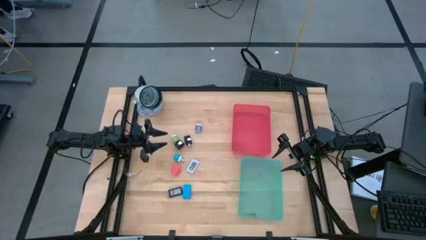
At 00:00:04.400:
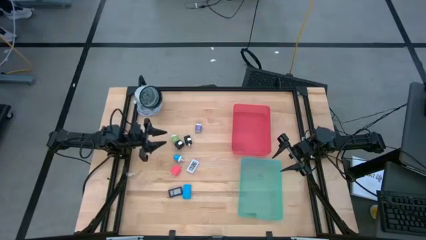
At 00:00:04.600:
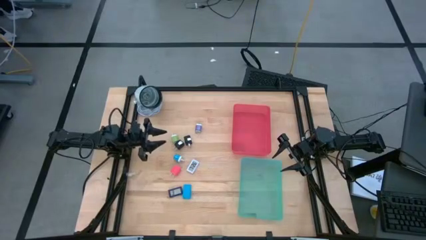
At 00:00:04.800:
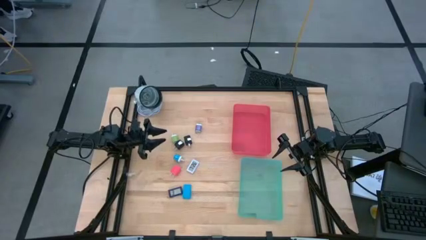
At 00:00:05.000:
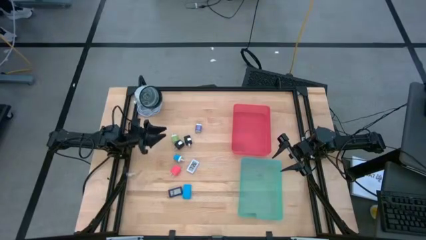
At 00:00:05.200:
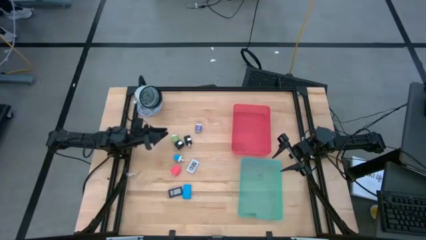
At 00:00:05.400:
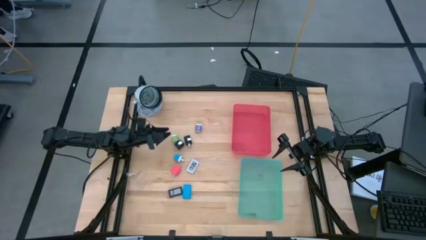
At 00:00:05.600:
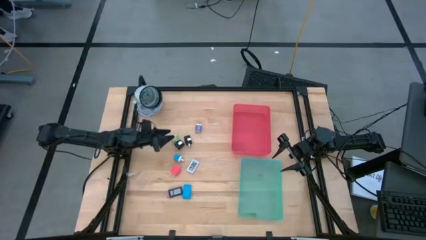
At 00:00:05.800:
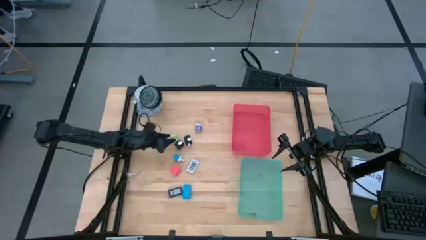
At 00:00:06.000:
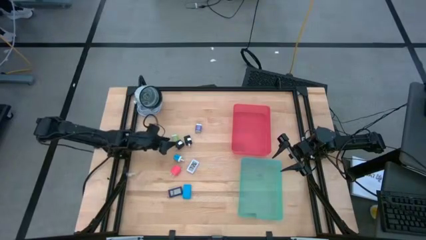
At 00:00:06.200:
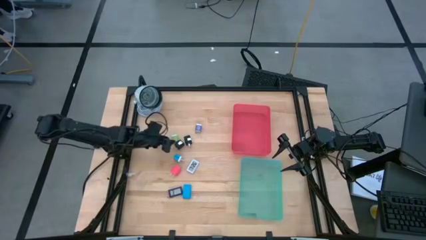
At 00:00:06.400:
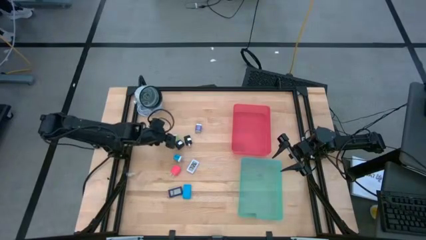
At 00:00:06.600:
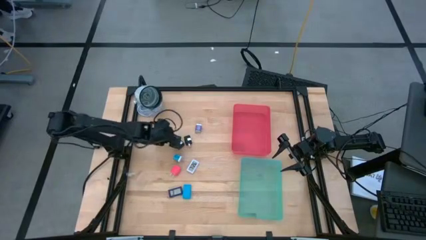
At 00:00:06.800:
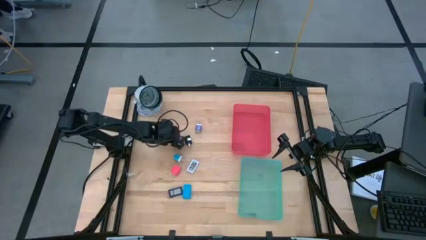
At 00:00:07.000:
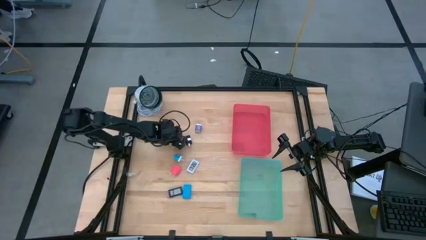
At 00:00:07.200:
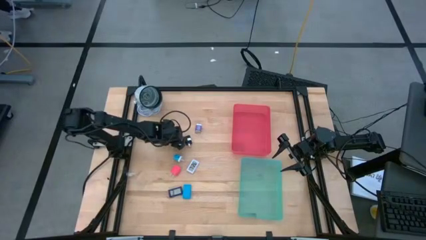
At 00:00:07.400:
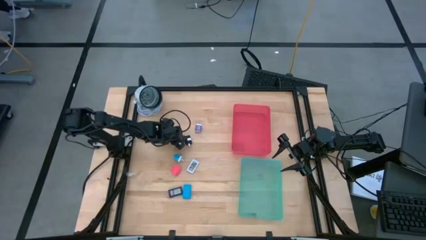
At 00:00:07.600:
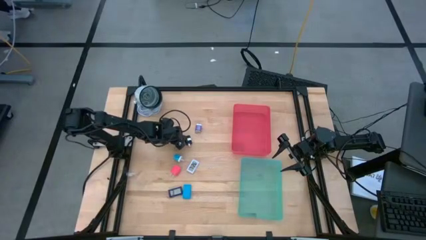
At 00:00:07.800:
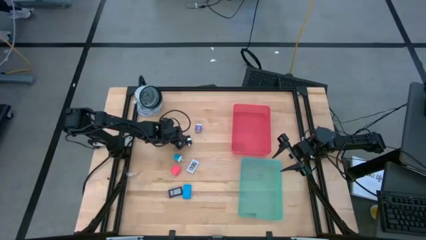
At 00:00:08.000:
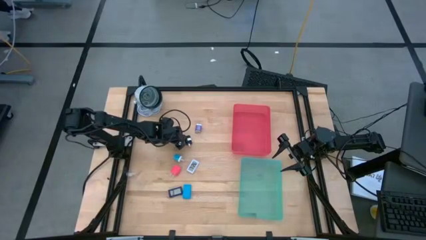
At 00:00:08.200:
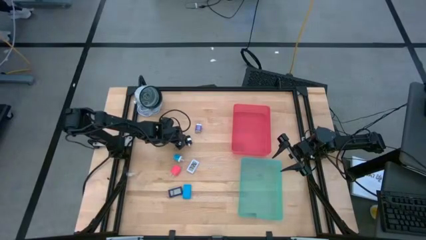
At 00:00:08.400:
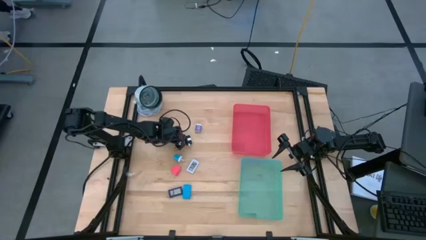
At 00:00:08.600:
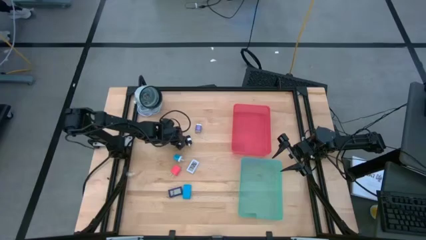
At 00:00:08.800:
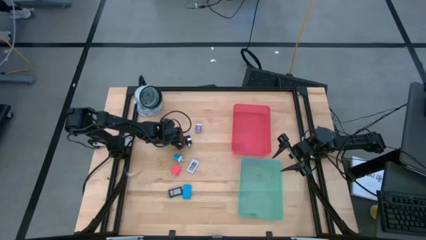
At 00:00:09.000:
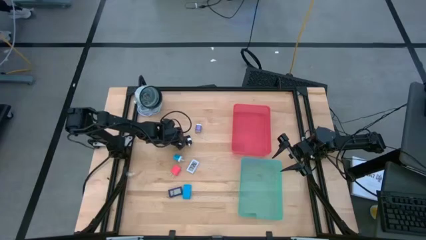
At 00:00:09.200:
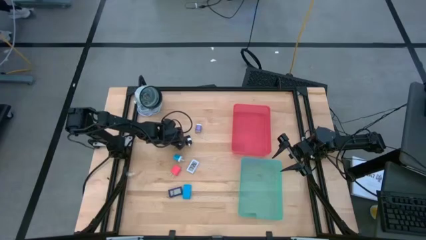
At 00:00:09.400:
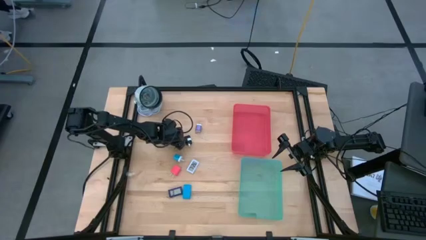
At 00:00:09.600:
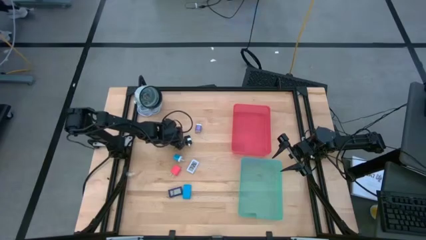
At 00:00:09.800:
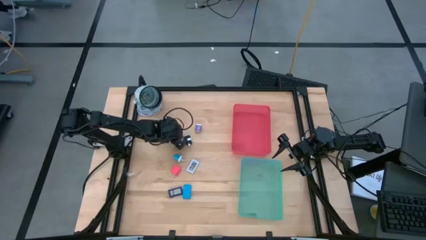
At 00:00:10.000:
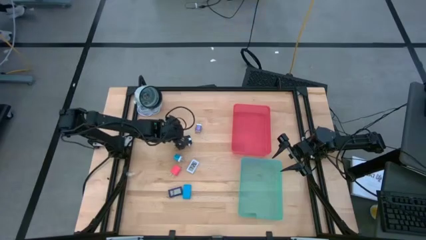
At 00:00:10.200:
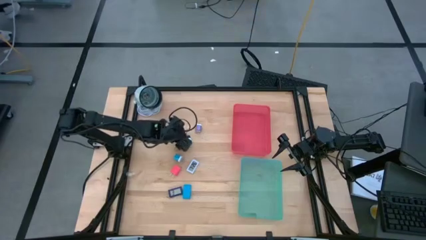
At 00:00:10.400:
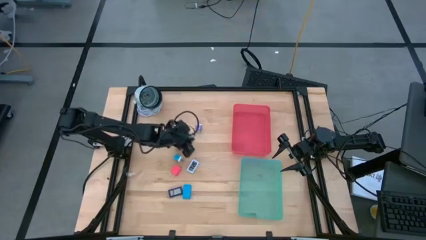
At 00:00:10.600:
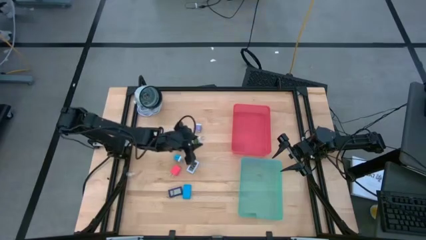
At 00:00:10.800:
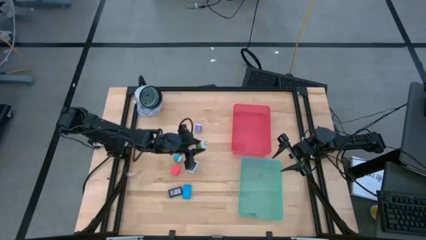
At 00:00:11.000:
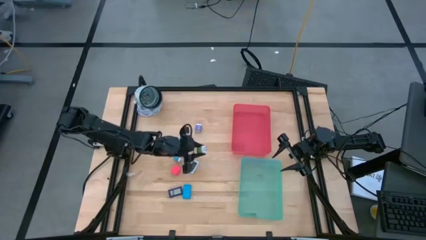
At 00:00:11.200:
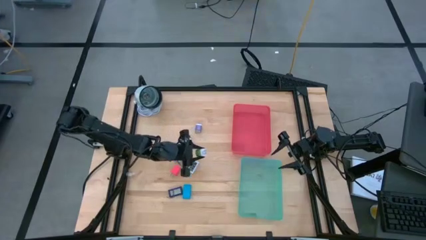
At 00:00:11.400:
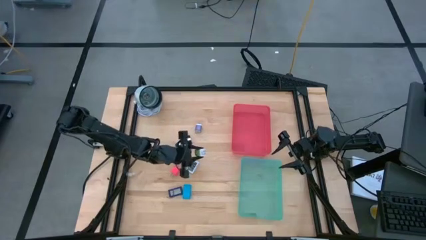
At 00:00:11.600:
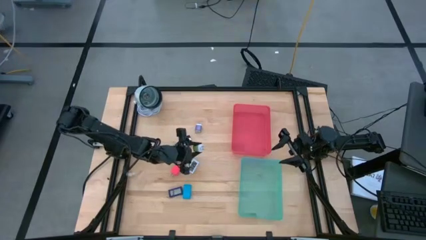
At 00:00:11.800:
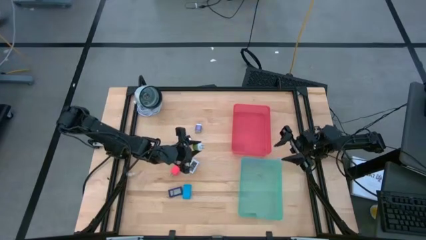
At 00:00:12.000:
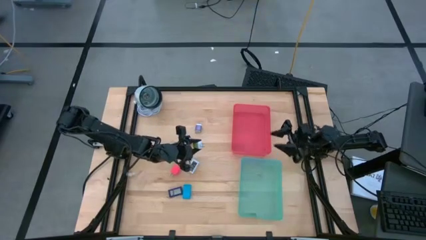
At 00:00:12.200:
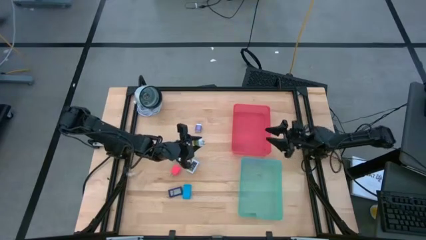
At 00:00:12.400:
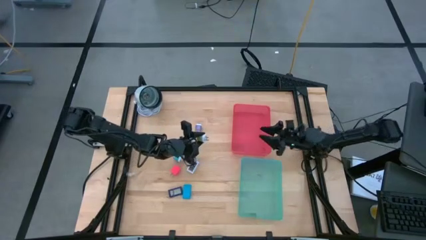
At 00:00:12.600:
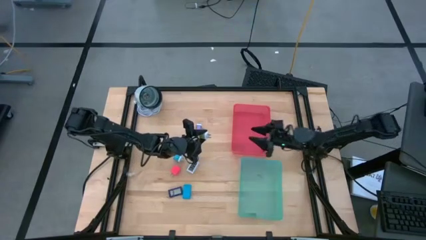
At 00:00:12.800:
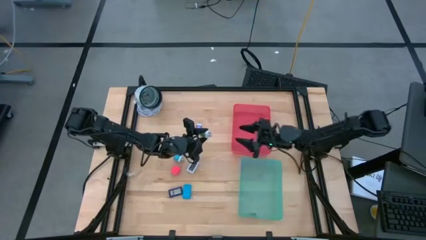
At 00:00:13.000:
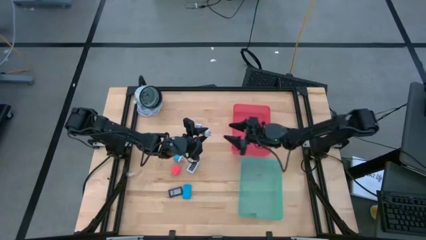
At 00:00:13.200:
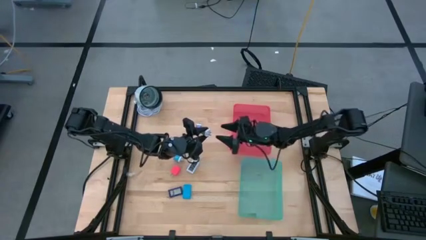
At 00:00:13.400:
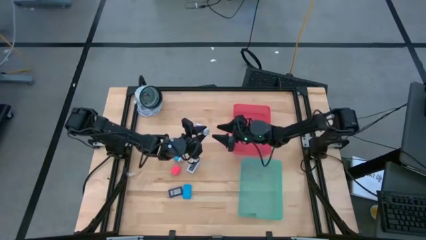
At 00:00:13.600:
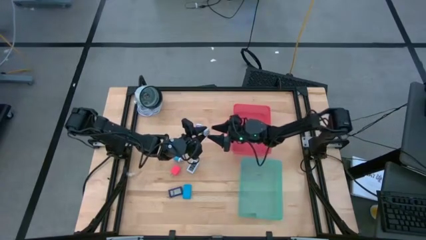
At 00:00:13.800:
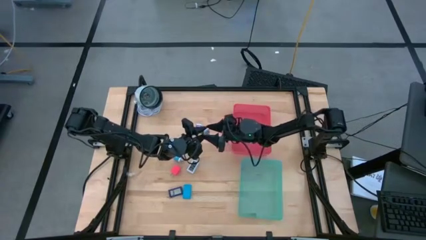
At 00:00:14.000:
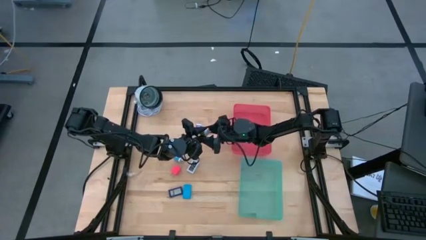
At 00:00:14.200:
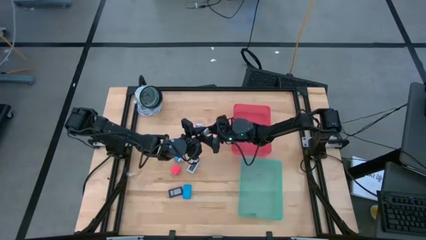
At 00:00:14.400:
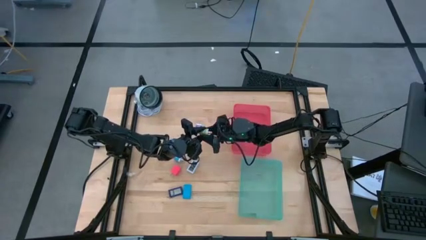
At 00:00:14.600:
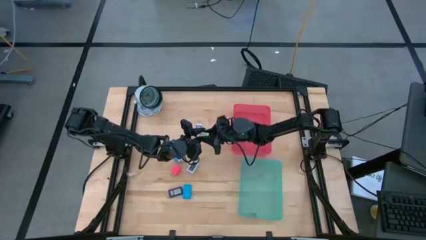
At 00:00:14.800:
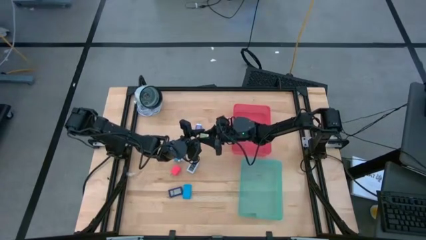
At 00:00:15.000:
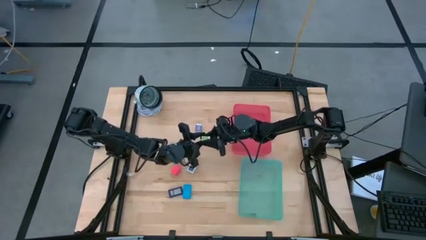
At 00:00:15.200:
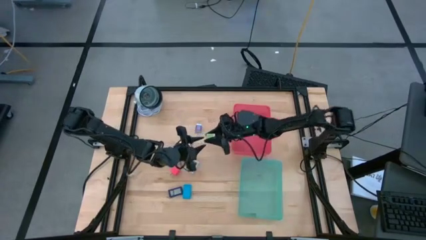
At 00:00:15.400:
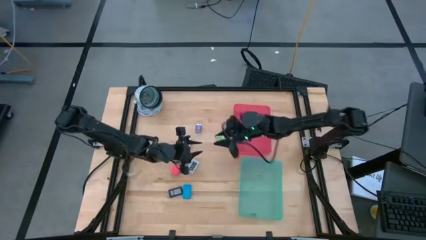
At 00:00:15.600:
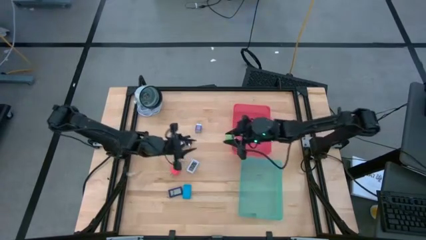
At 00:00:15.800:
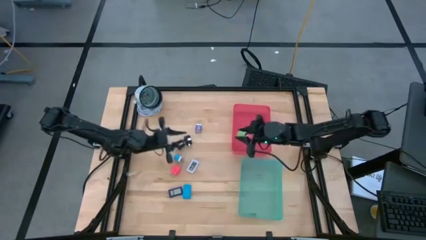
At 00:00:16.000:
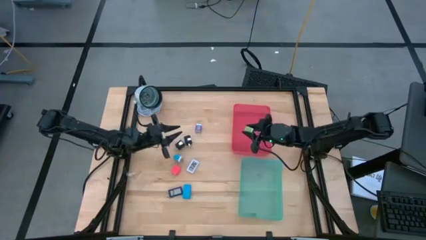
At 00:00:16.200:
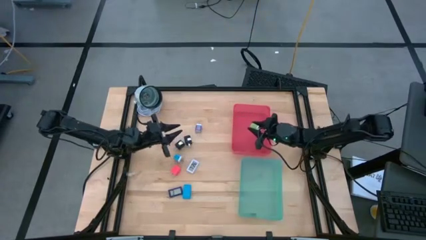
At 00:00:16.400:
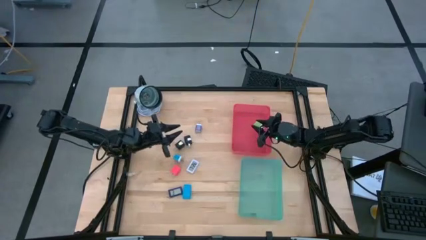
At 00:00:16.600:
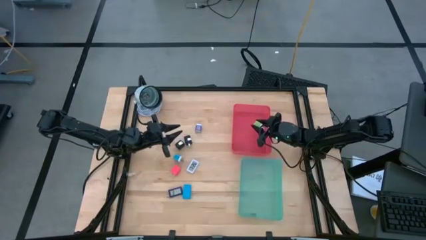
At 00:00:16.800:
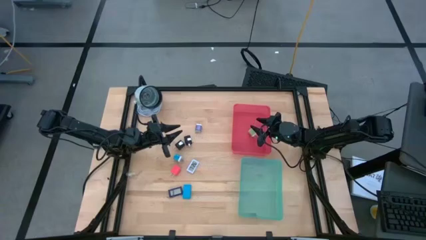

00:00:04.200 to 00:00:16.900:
Task: Pick & Place Office items
Put the green charger adapter into the red bin
